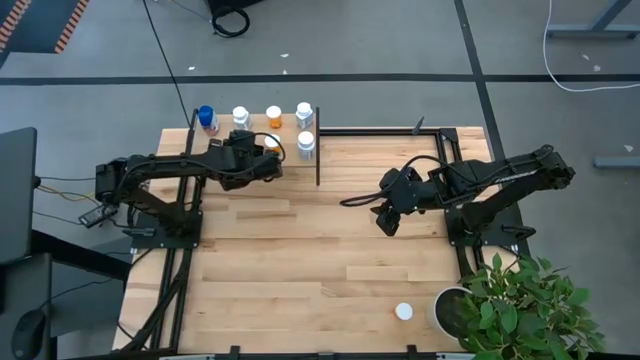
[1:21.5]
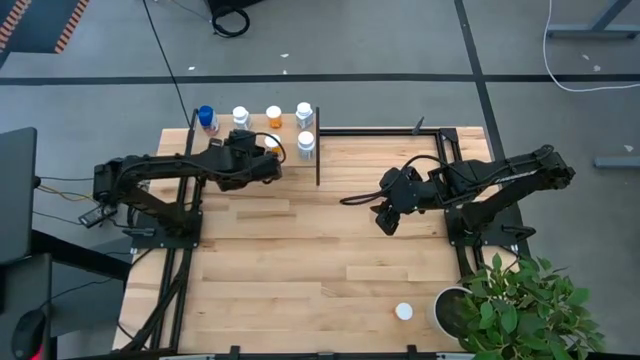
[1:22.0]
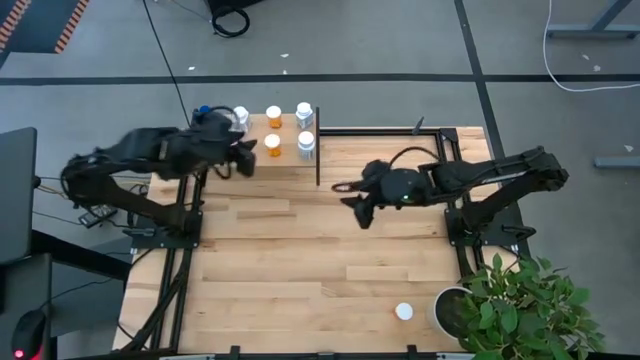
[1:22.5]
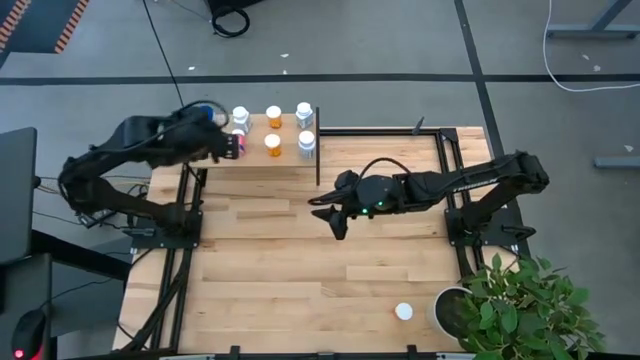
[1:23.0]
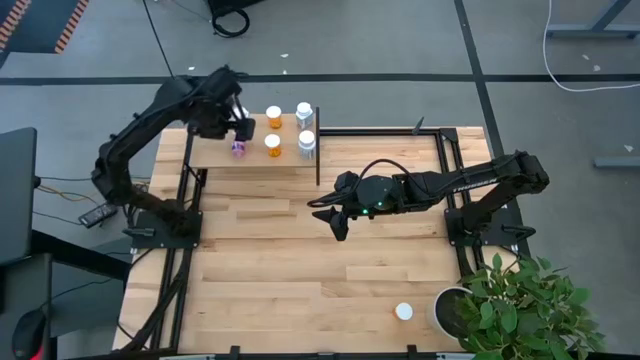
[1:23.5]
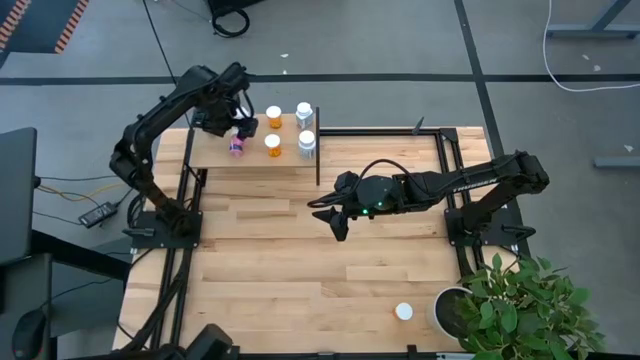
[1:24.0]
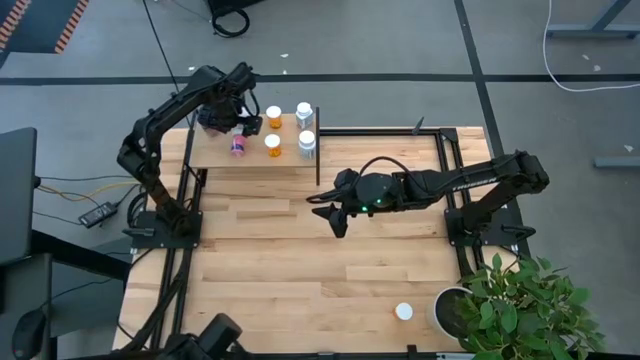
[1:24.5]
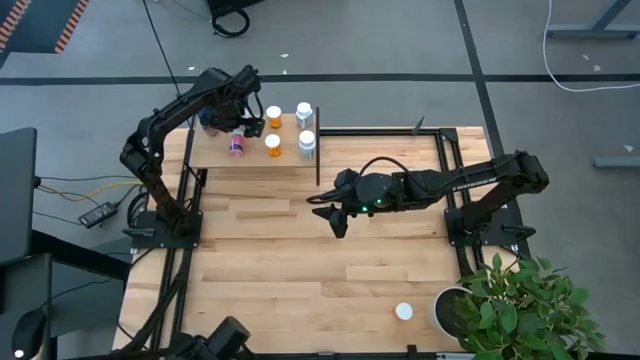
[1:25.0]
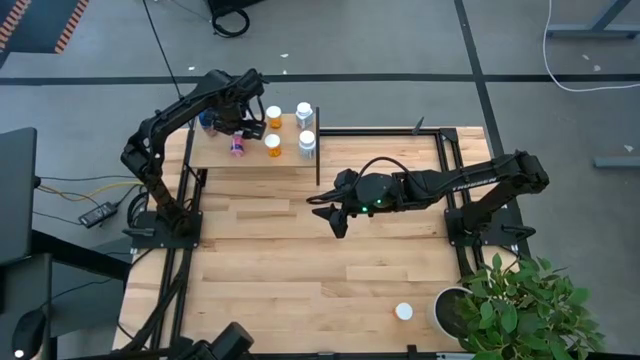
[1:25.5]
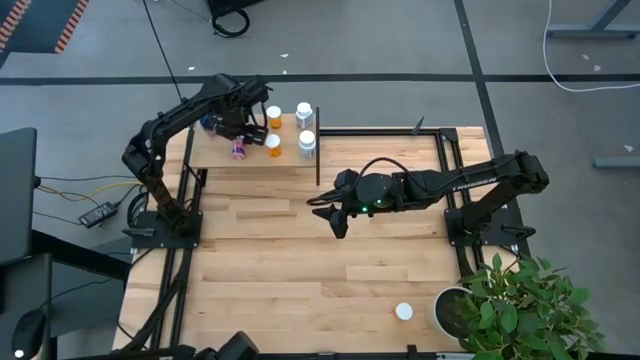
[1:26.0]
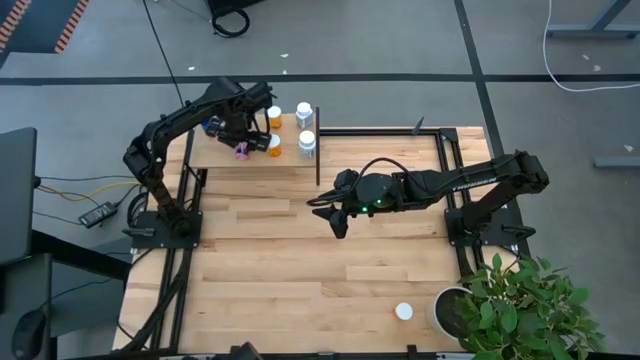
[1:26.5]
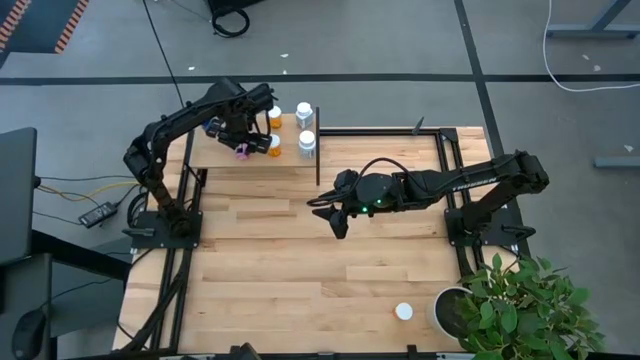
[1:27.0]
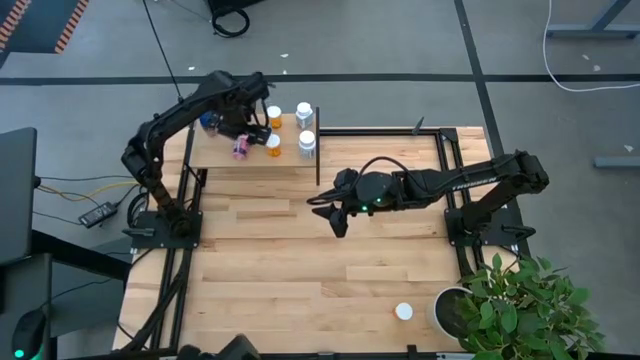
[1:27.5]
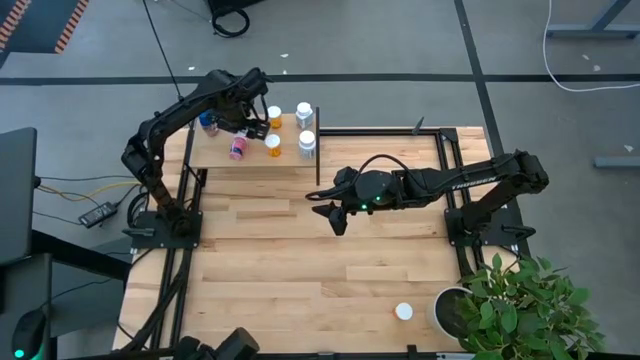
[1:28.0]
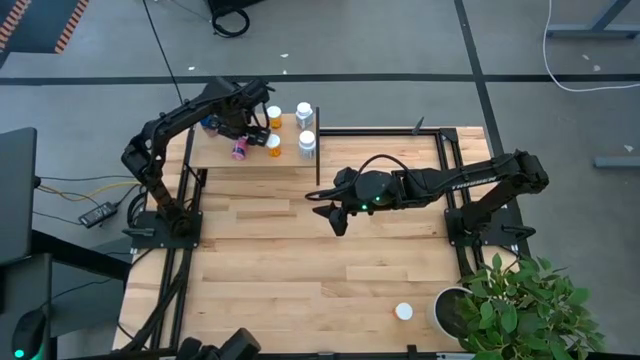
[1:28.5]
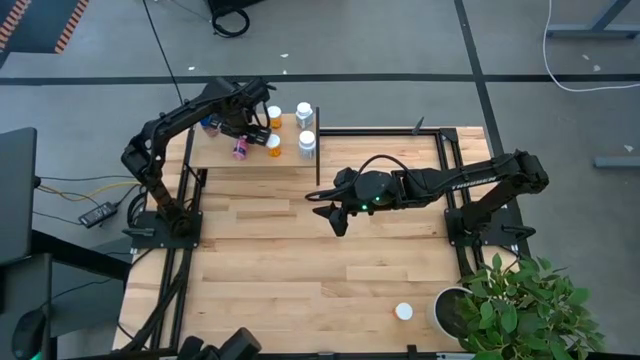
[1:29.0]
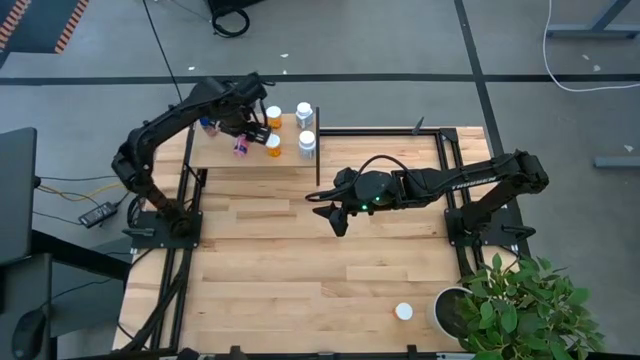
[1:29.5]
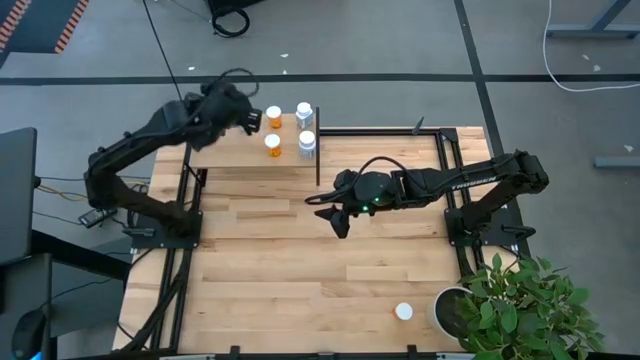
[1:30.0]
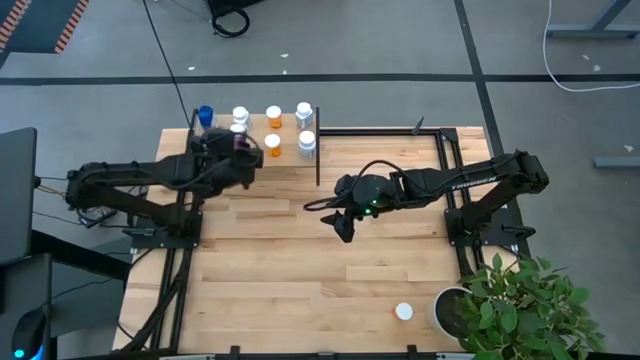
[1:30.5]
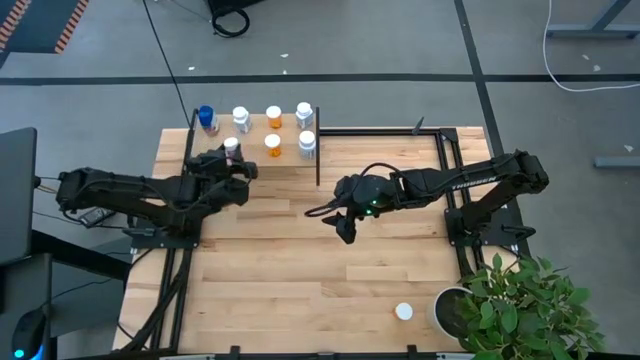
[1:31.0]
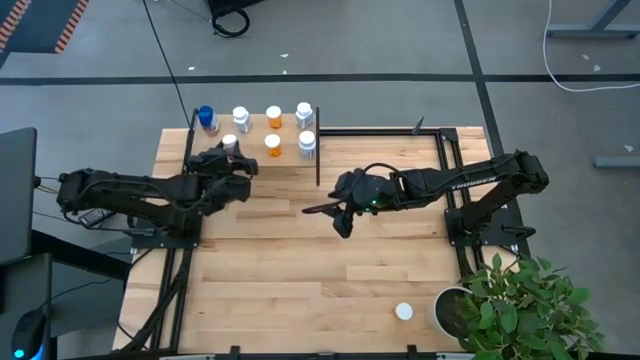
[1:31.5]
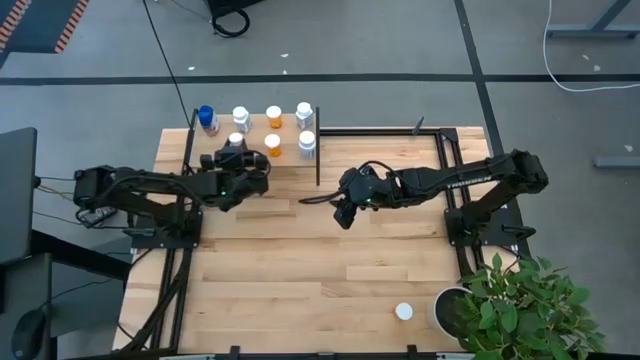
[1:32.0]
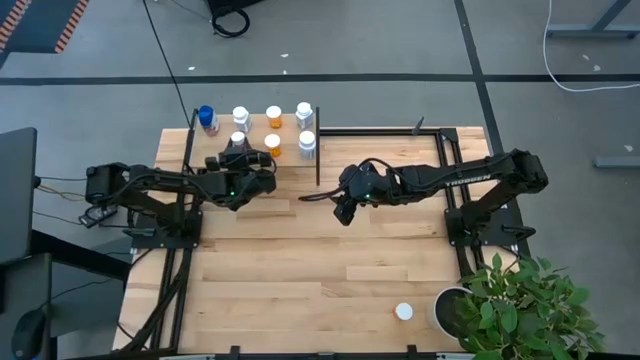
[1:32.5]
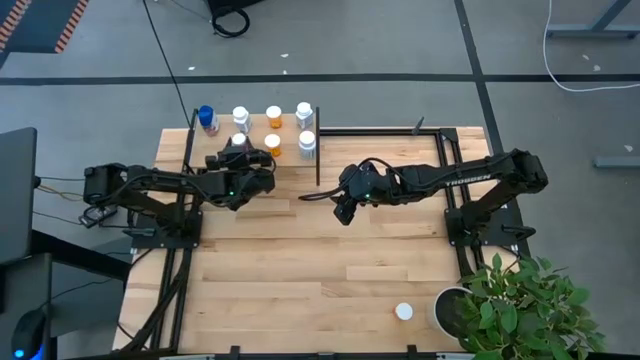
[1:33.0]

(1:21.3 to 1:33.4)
Task: Pick and place medicine bottles onto shelf by color
Put the pink pill bottle on the shelf
